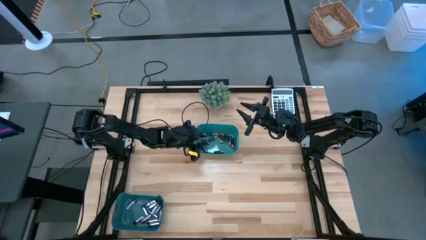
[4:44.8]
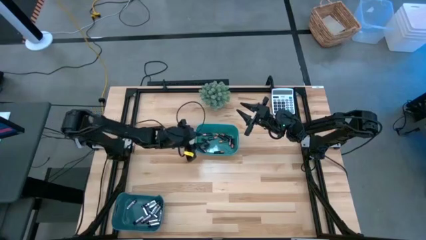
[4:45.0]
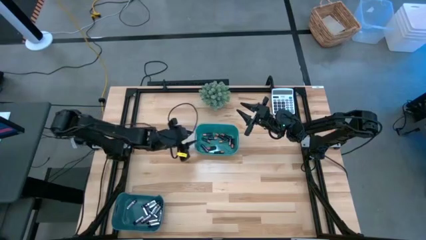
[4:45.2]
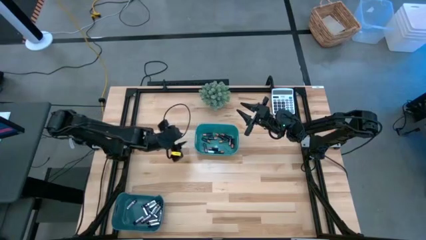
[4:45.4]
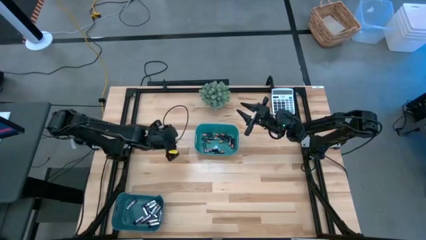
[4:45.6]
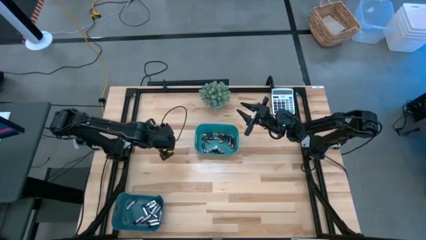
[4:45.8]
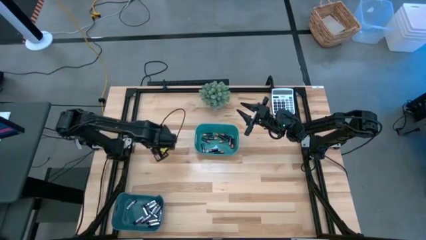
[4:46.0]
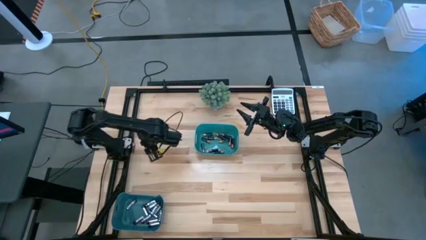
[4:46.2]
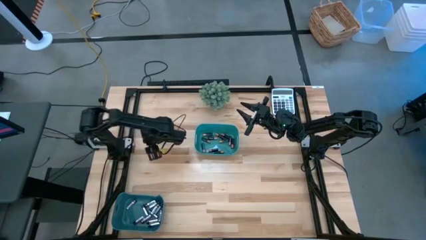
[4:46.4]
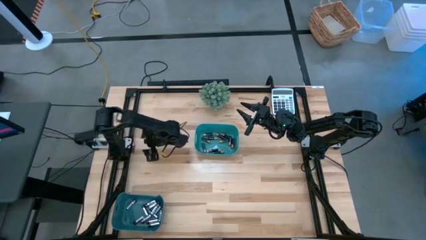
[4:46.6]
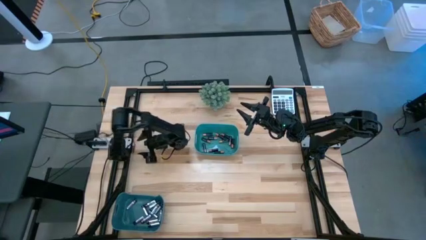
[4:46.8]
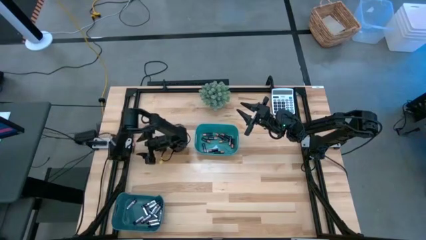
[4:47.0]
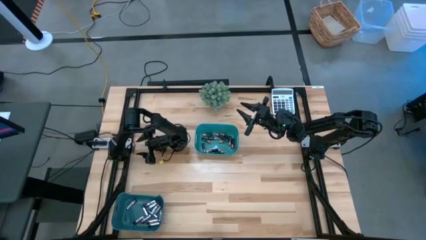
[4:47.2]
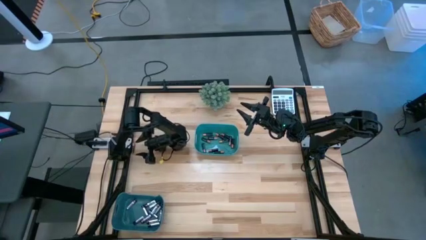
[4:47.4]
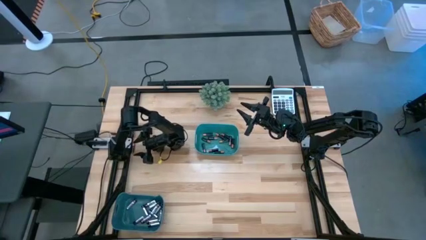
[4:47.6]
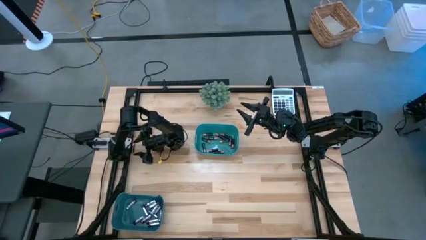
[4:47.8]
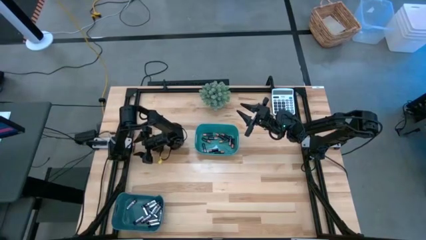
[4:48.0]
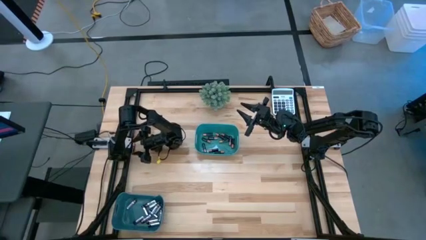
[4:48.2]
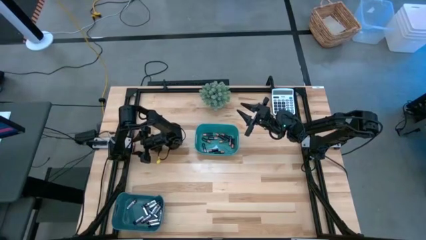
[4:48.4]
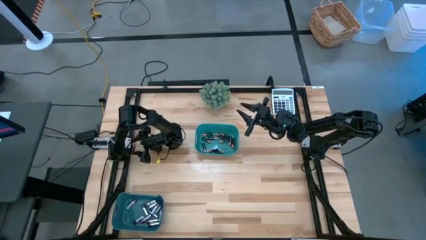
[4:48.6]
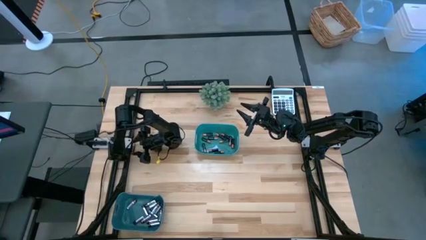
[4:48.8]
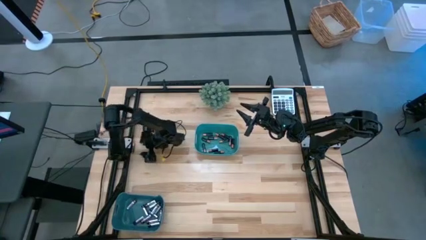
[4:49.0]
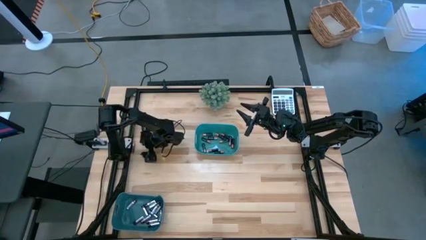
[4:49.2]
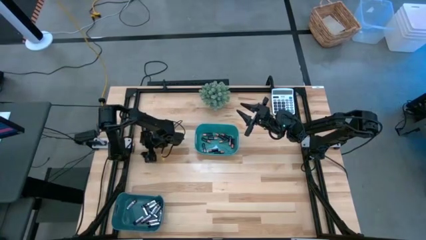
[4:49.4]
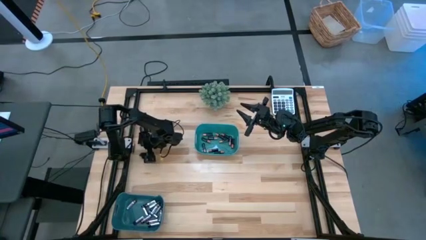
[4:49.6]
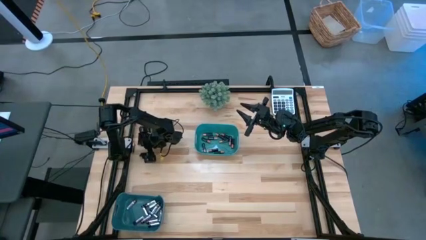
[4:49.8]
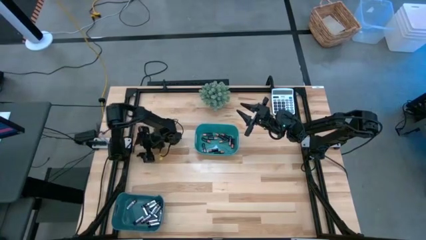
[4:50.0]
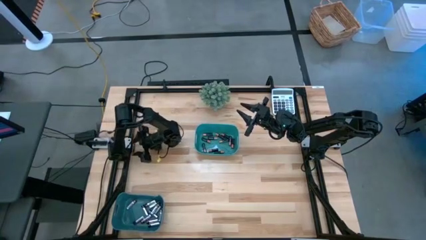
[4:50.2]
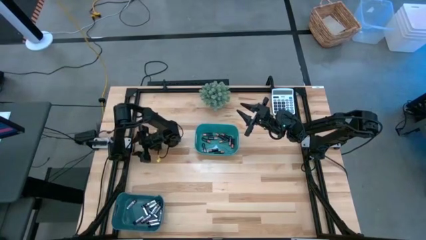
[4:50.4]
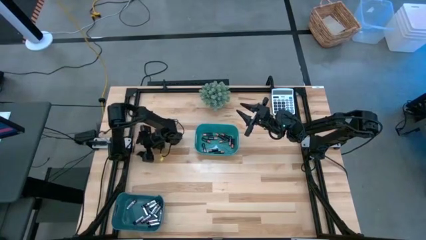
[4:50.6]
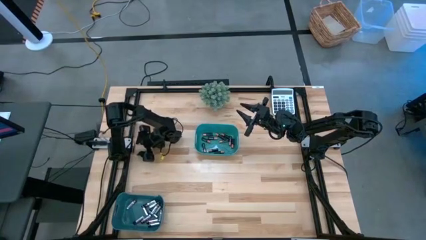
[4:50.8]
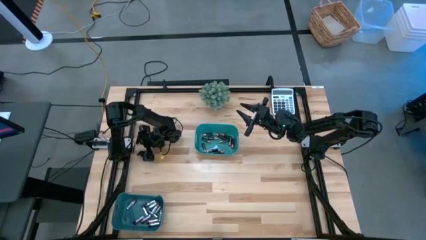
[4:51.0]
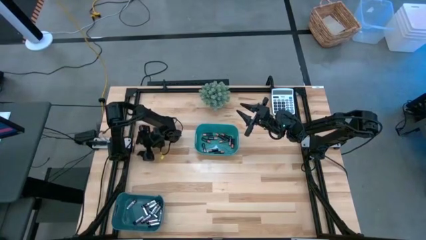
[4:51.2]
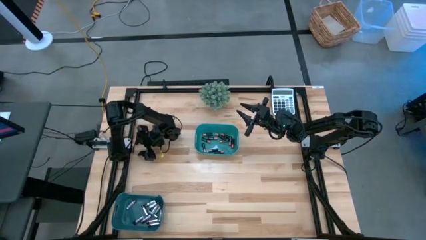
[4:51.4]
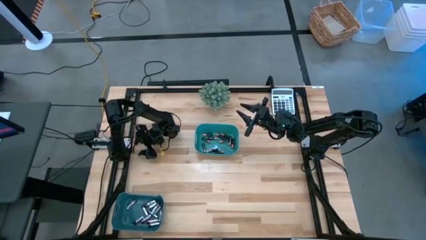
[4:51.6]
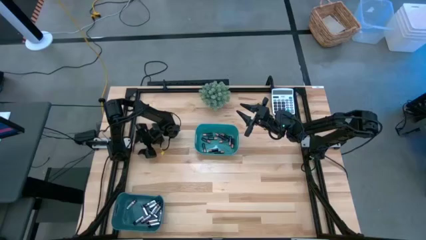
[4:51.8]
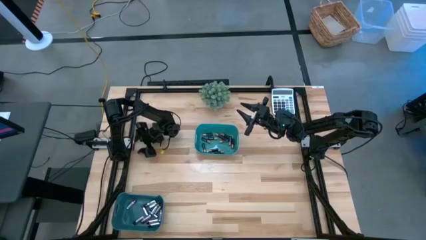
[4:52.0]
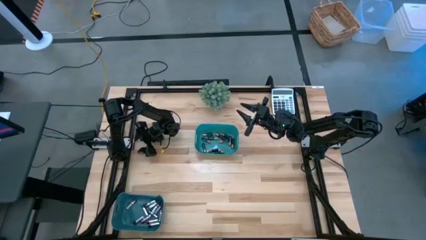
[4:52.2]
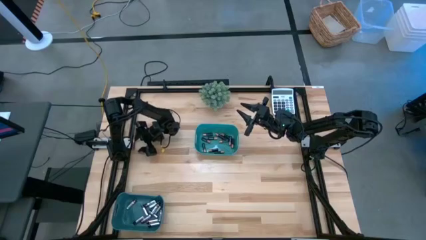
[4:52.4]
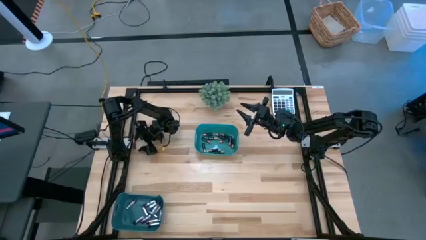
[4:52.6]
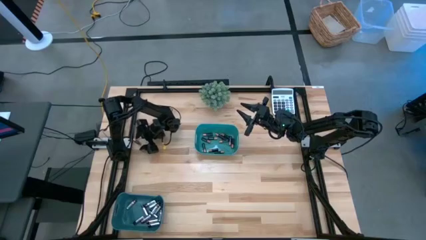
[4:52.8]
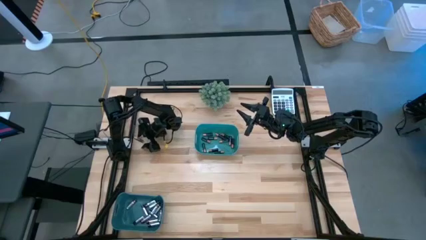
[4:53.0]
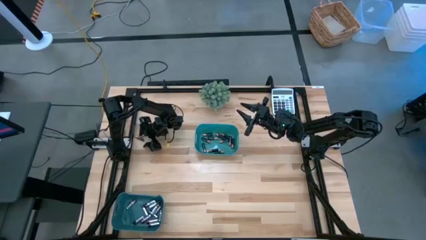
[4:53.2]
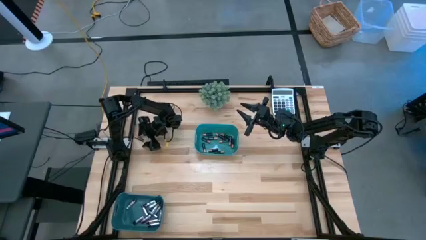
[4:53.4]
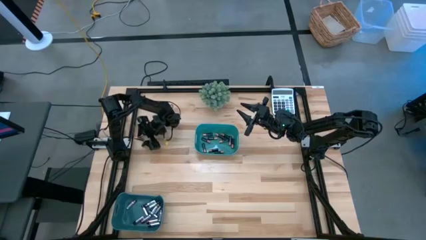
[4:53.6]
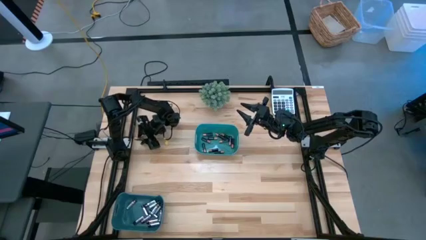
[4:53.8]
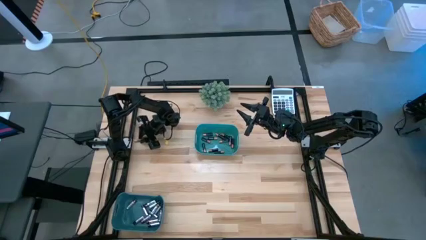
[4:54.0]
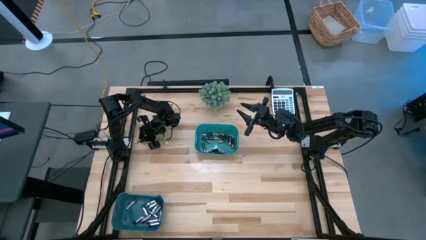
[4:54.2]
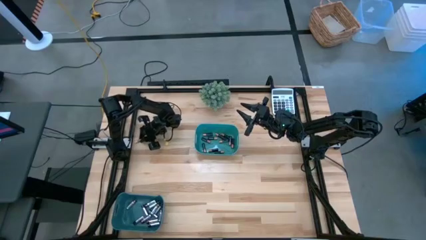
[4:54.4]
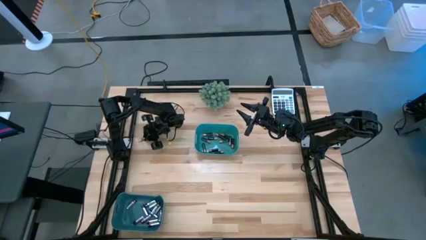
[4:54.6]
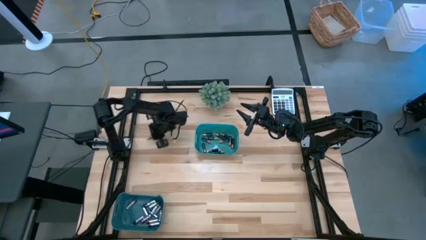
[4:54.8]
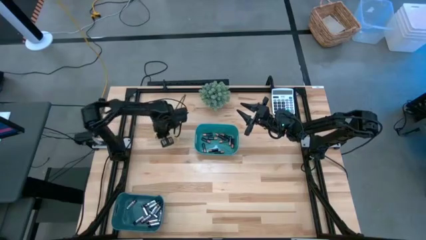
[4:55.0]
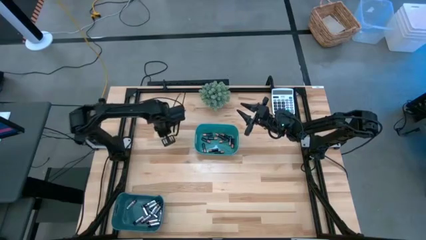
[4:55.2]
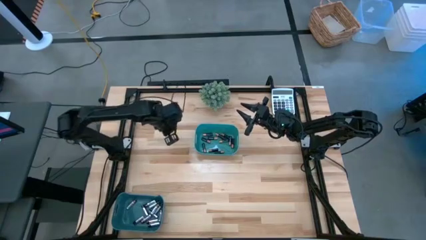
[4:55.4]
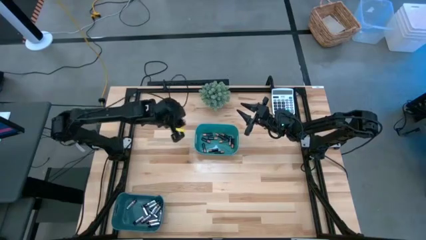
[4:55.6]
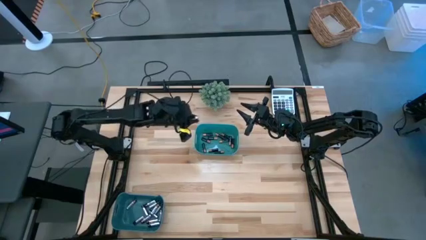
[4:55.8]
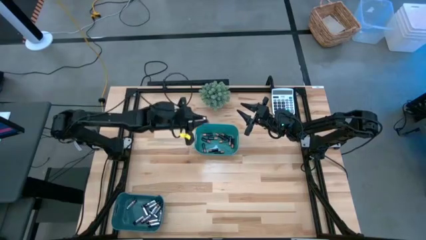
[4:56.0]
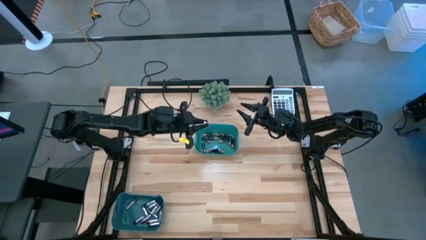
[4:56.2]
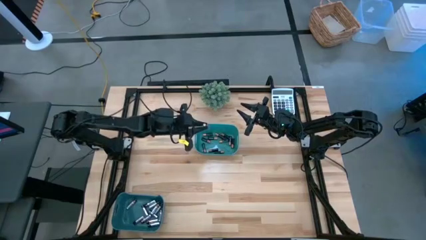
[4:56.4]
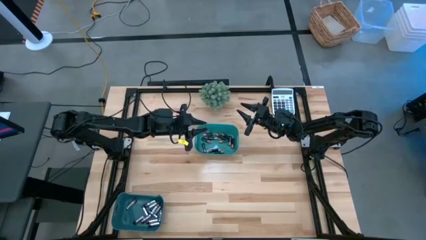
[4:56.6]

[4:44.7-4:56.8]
Task: Sort batteries
Put the black battery into the green bin

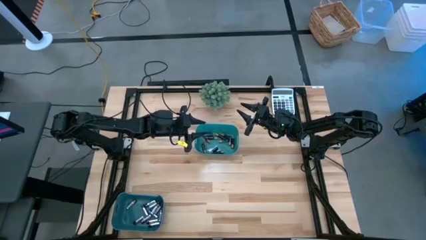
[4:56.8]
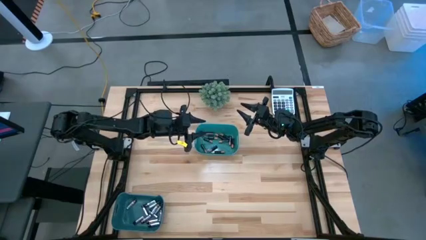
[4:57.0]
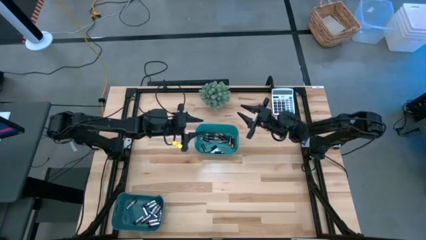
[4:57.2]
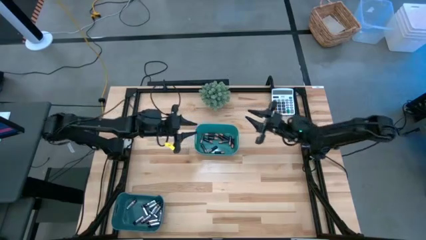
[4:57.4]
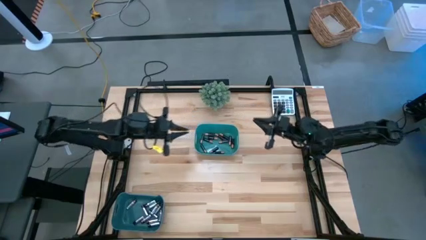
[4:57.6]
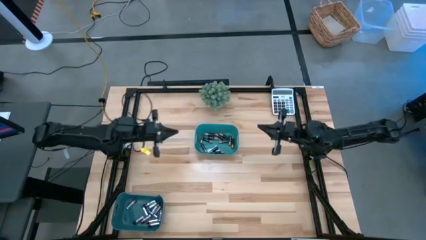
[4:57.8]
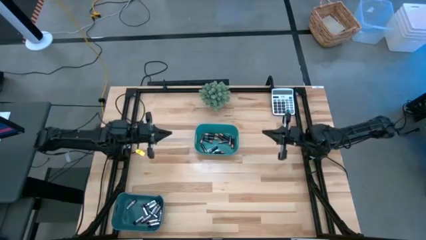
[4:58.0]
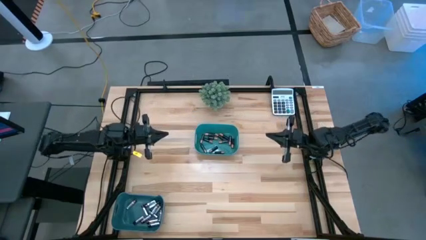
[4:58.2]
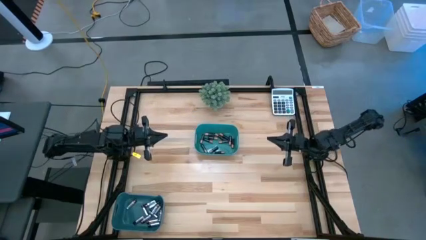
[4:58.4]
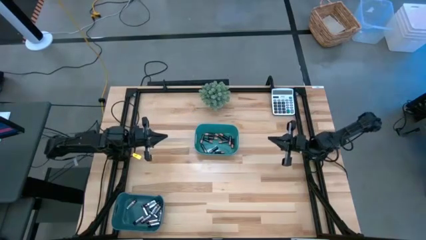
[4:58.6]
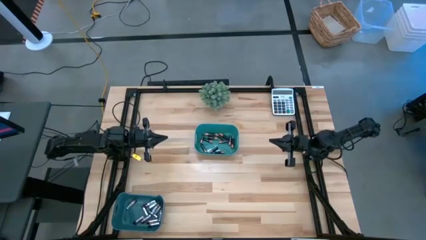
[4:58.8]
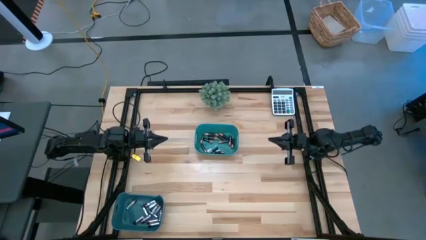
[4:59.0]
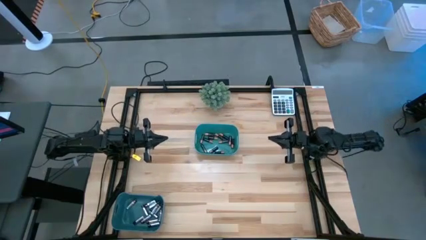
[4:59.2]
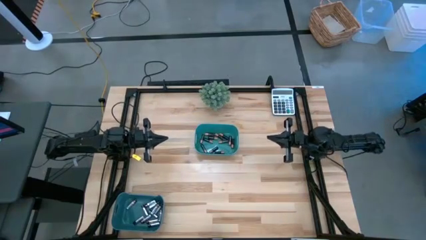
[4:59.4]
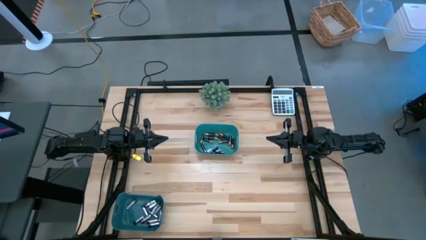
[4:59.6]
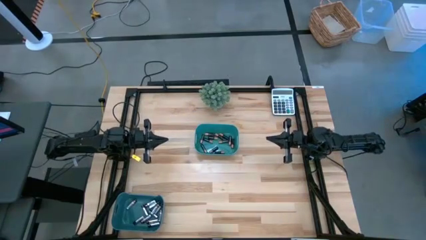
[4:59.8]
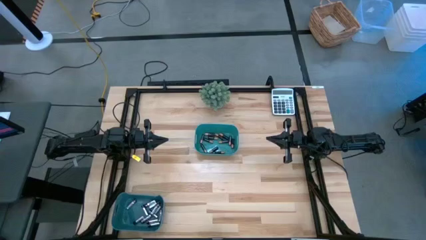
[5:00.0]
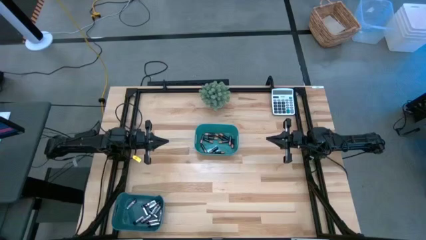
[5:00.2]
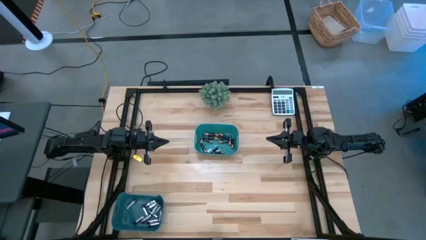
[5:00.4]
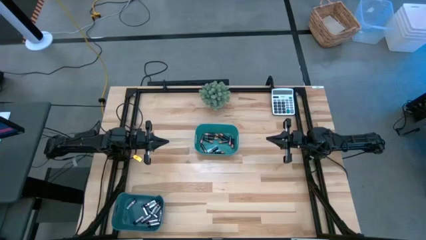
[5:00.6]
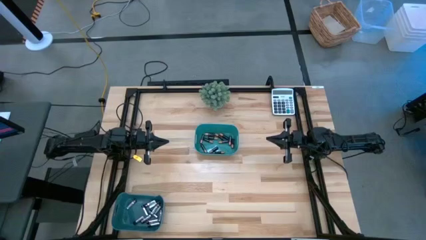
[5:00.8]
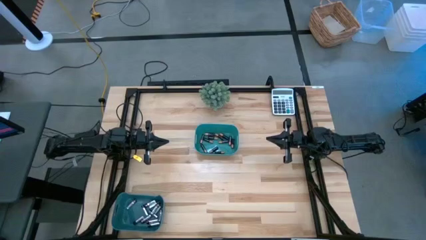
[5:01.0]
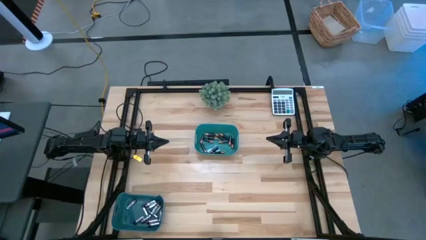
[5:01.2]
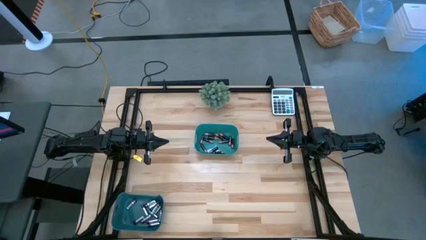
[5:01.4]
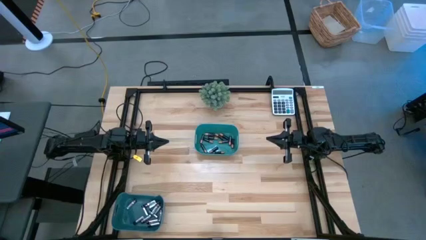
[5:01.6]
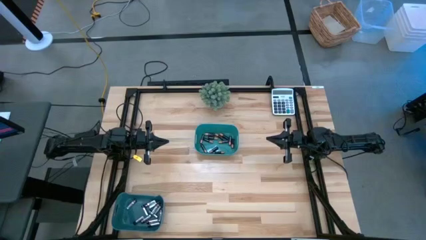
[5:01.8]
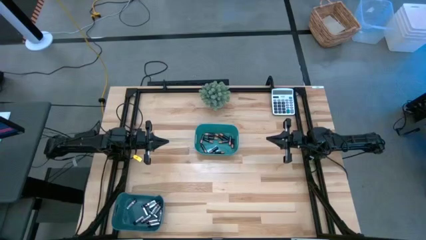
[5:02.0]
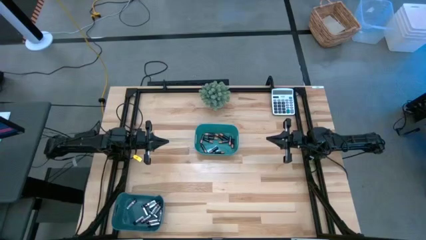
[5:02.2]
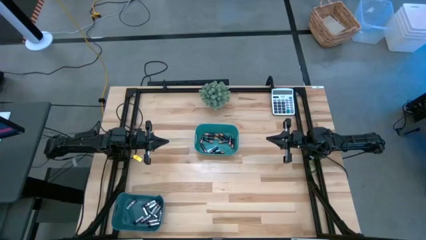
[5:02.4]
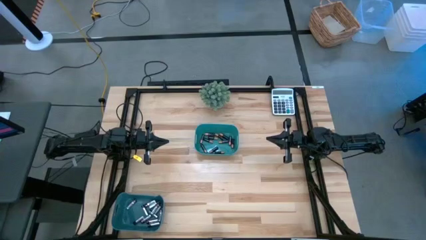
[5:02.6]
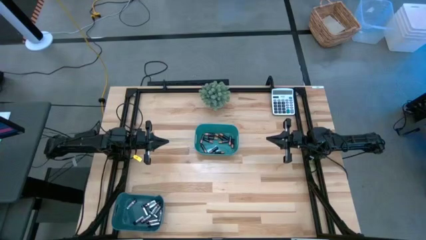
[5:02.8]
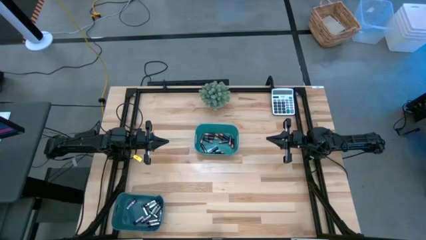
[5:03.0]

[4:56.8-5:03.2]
Return to Home Position
